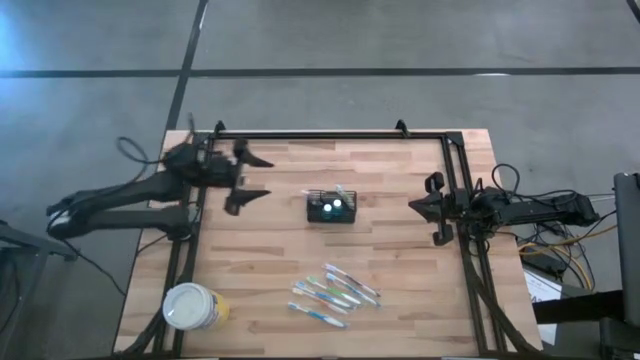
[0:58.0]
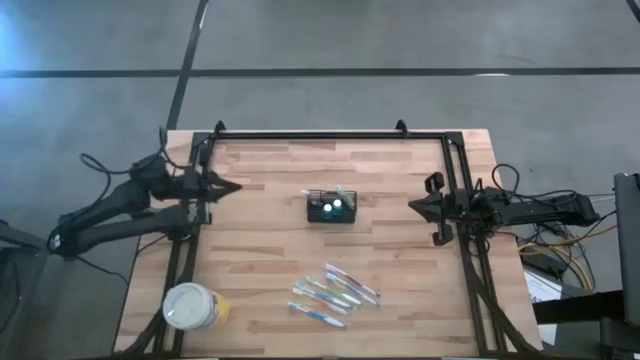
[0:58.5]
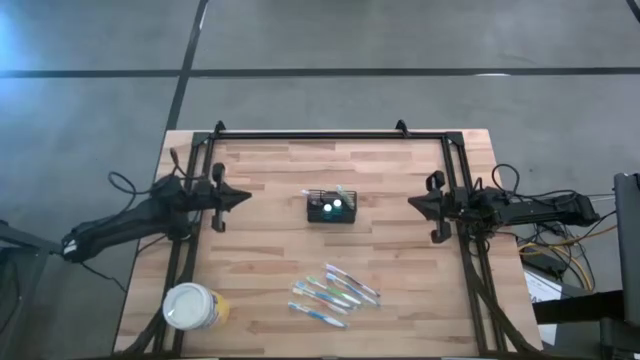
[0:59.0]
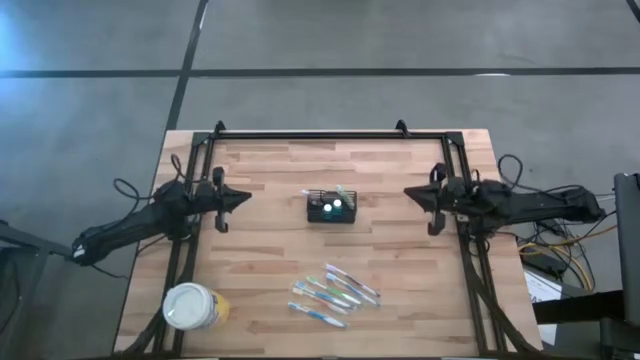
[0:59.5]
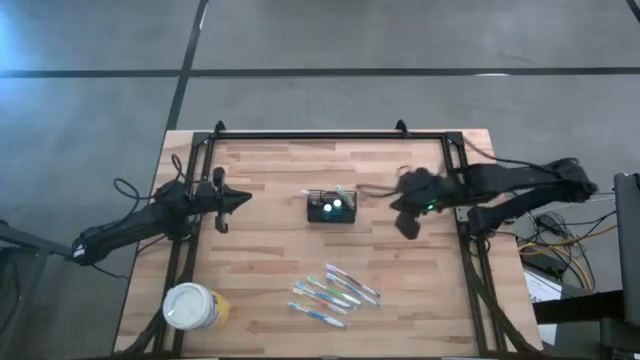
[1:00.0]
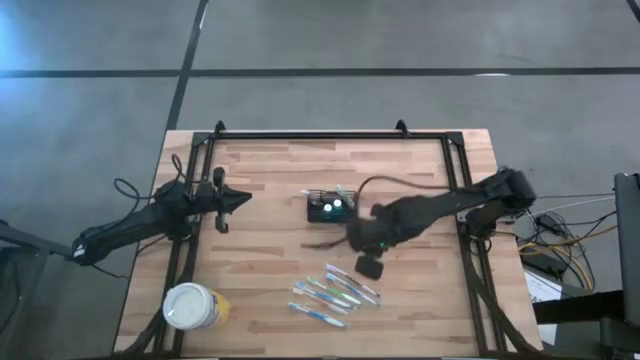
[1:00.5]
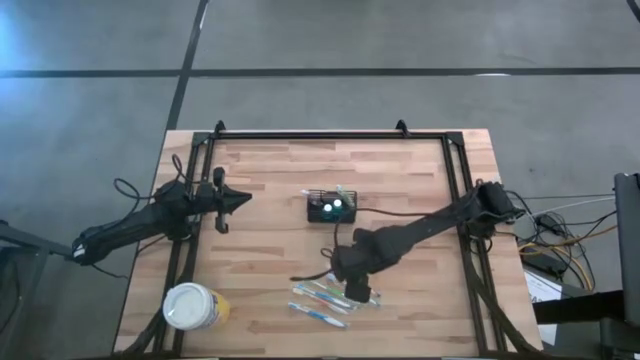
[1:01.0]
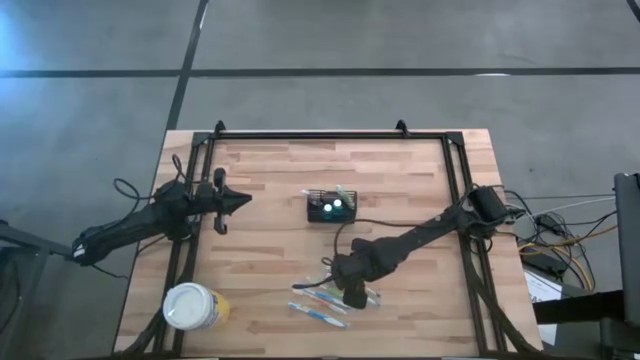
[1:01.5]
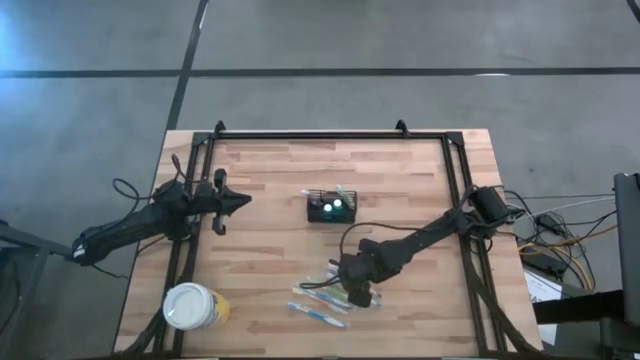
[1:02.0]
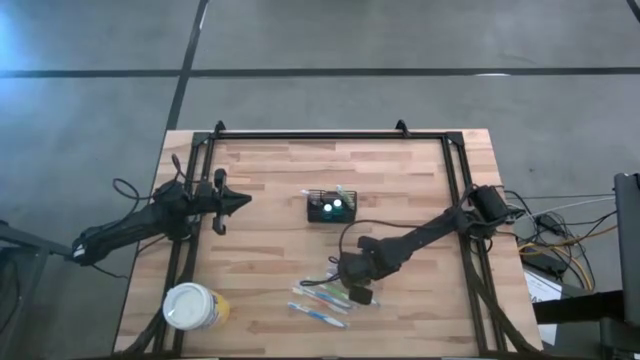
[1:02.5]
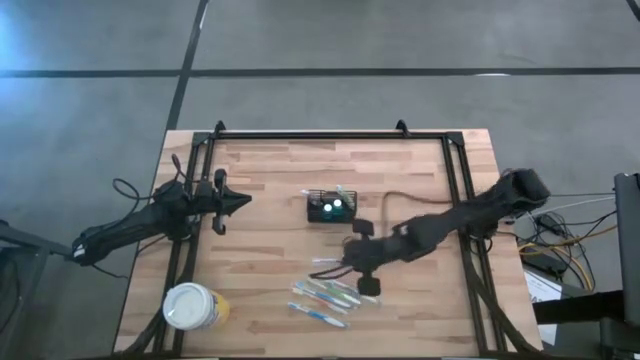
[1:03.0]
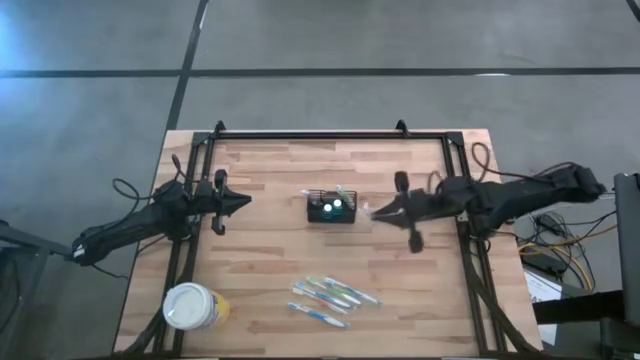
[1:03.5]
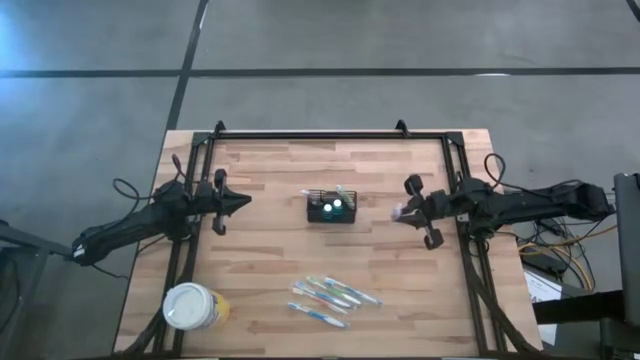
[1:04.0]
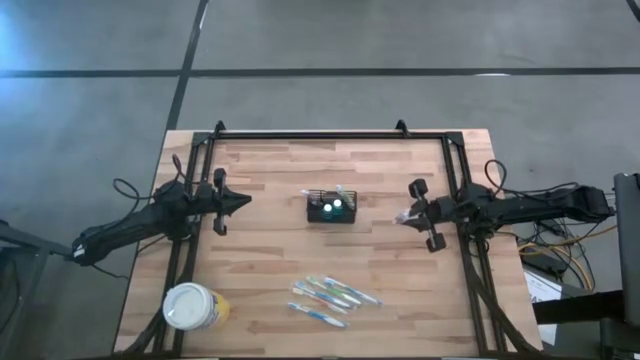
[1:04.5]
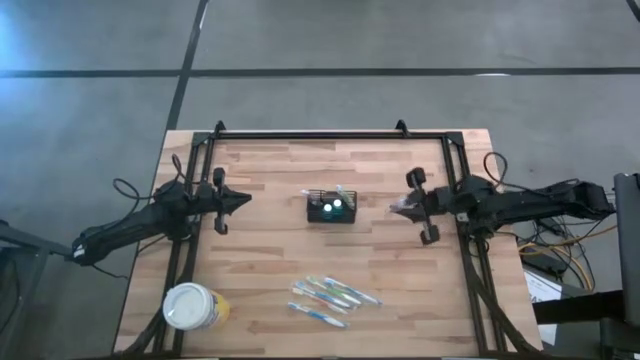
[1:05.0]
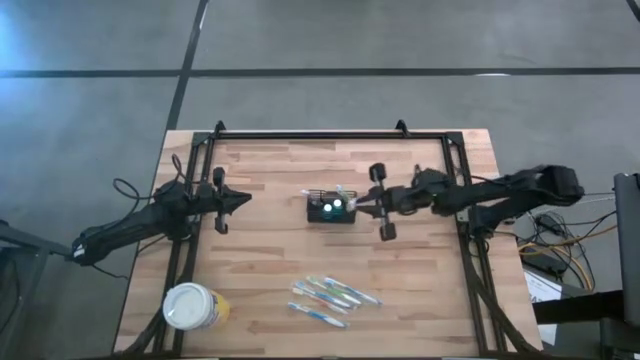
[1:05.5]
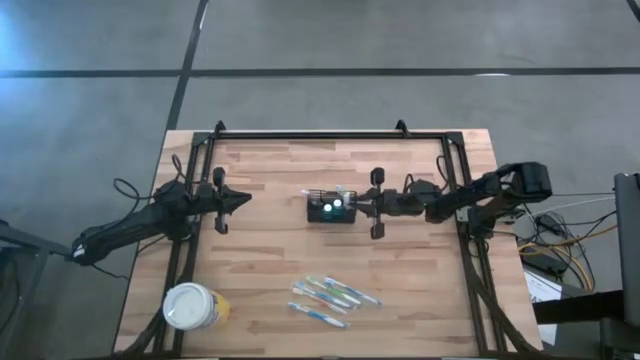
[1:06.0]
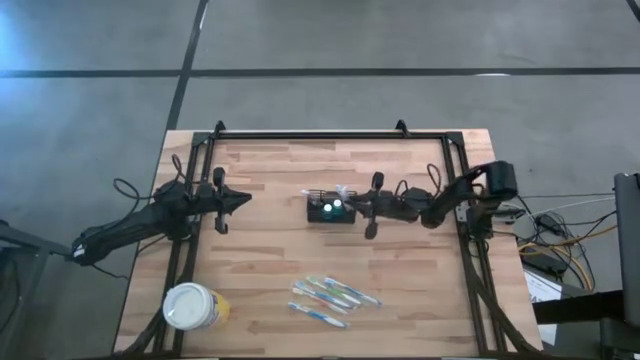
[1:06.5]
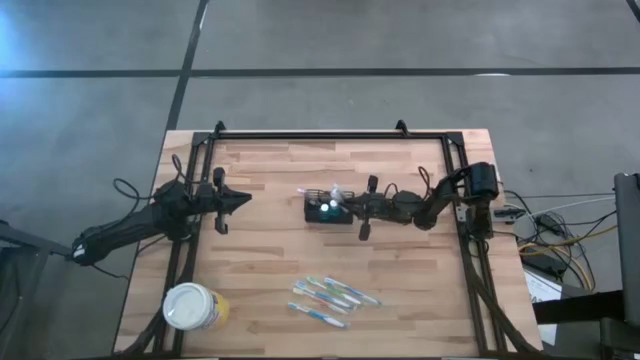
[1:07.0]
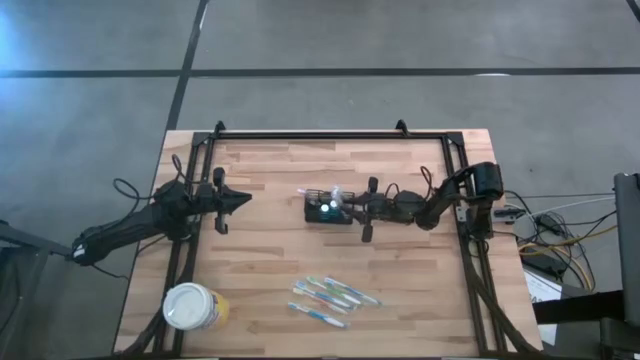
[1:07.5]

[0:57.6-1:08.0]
Task: Pick & Place toothbrushing station
Put the purple toothbrush into the black organizer

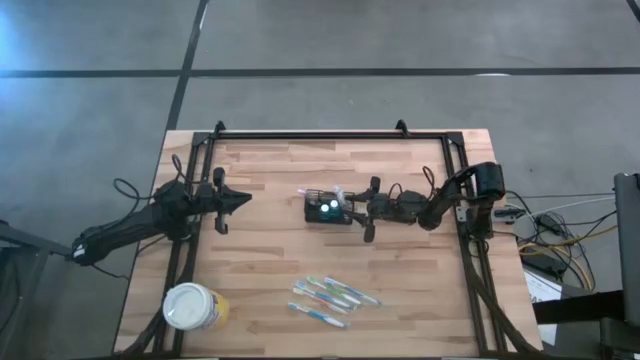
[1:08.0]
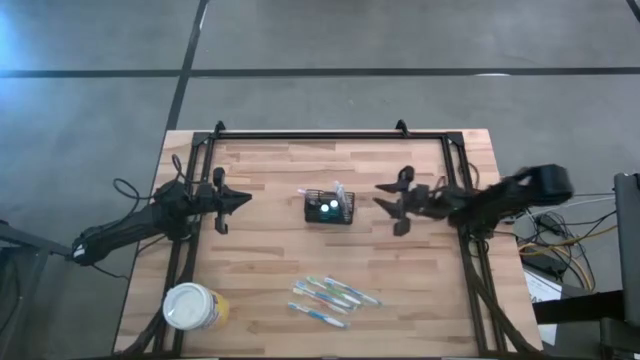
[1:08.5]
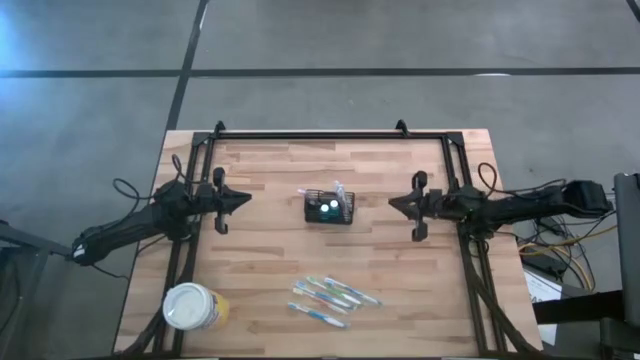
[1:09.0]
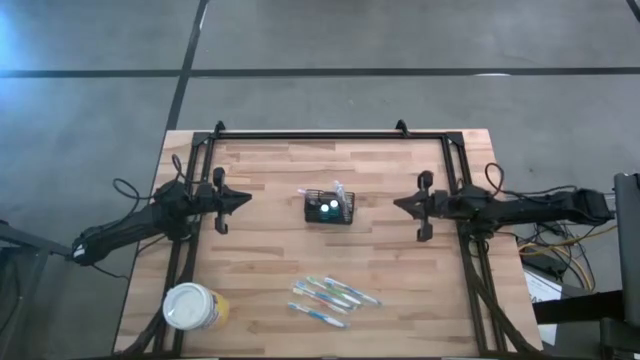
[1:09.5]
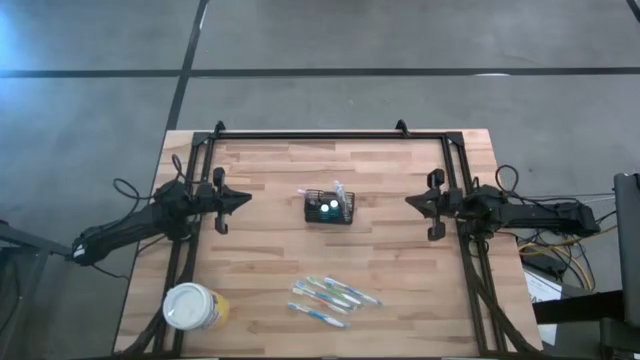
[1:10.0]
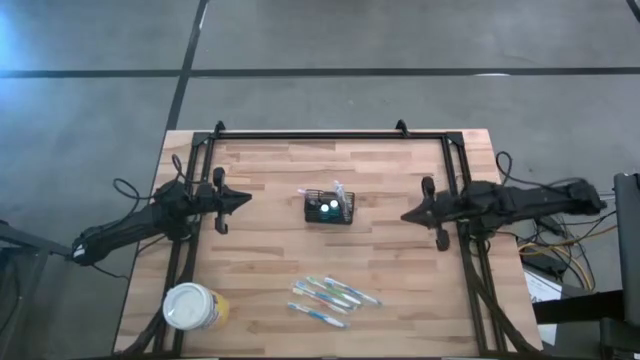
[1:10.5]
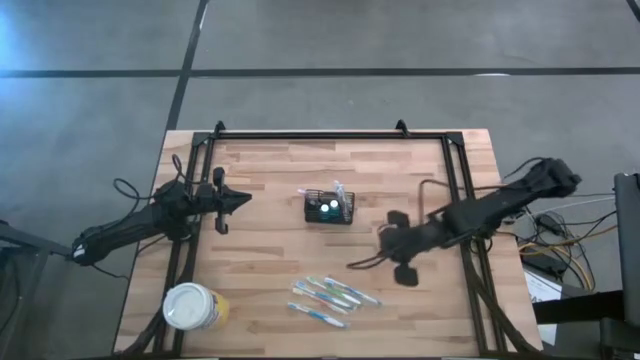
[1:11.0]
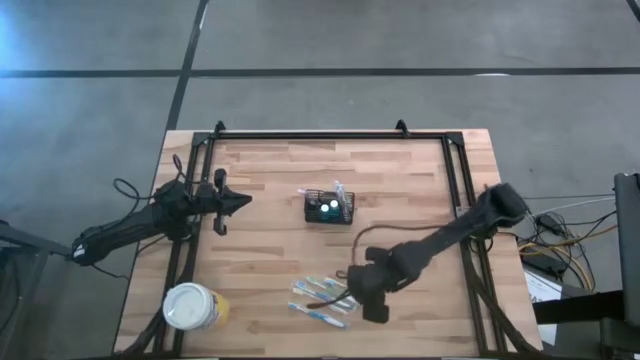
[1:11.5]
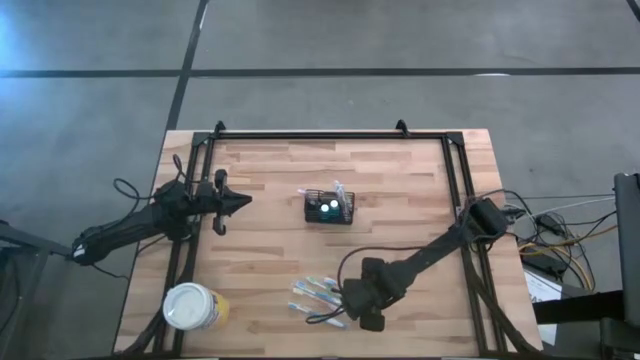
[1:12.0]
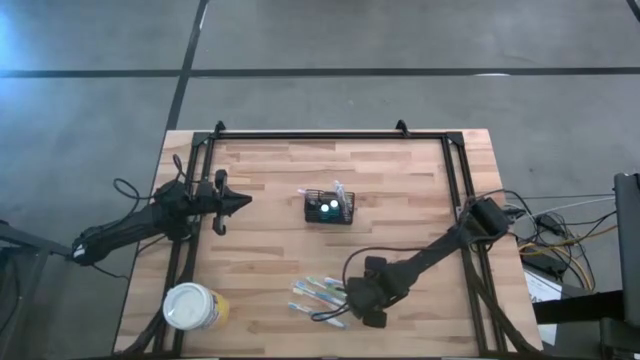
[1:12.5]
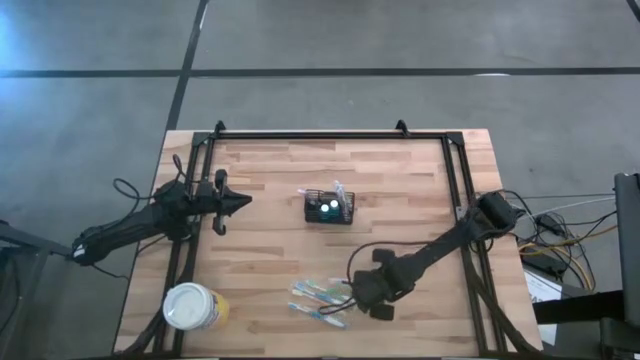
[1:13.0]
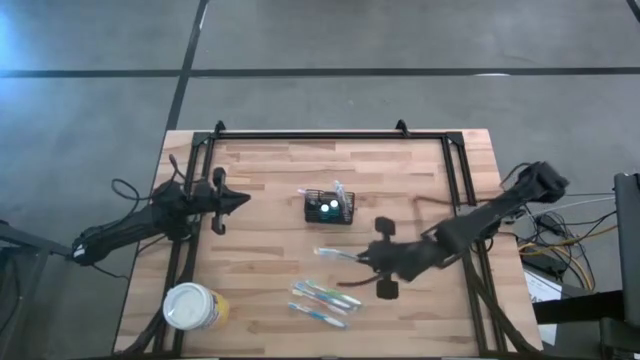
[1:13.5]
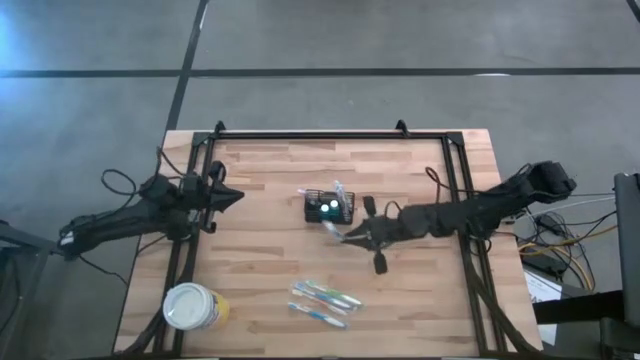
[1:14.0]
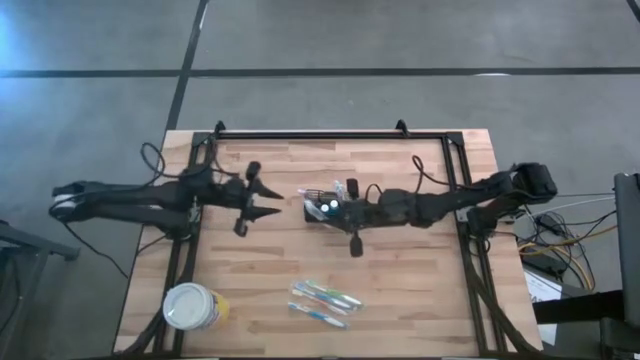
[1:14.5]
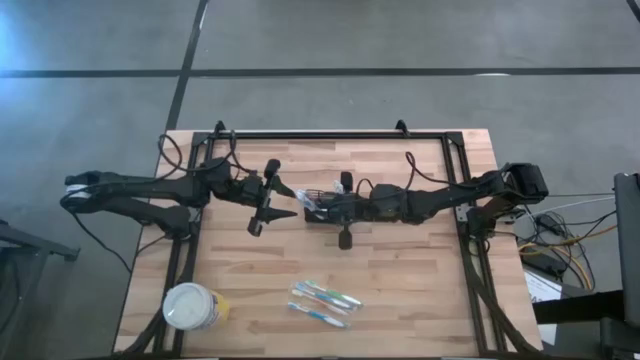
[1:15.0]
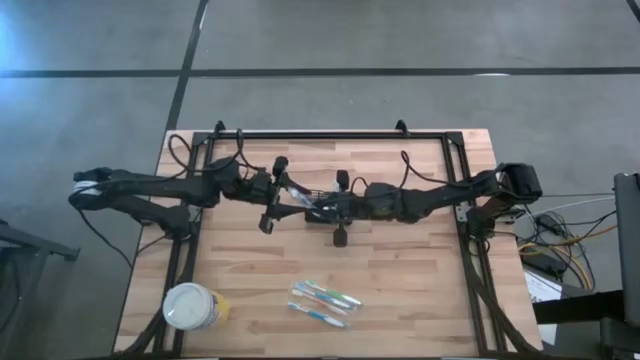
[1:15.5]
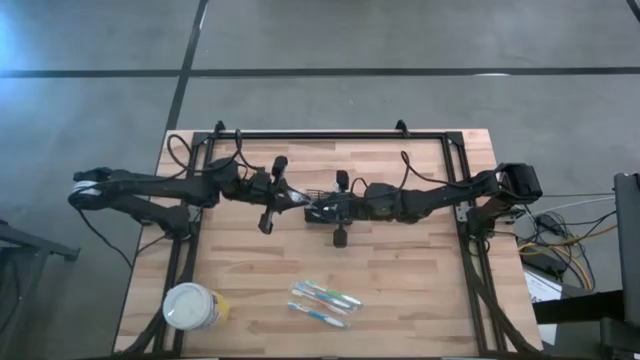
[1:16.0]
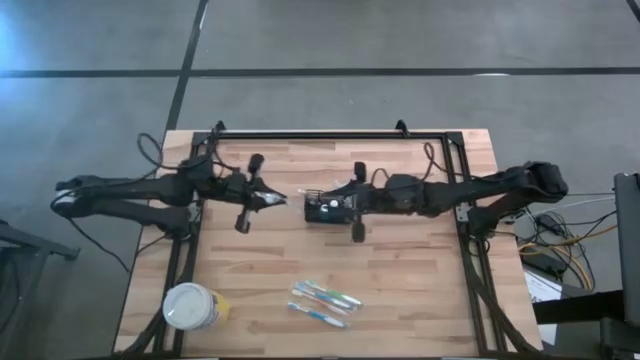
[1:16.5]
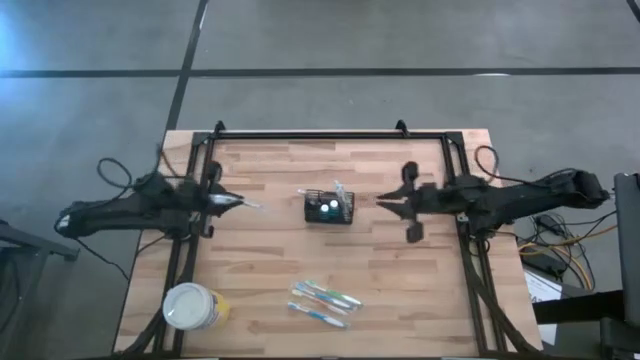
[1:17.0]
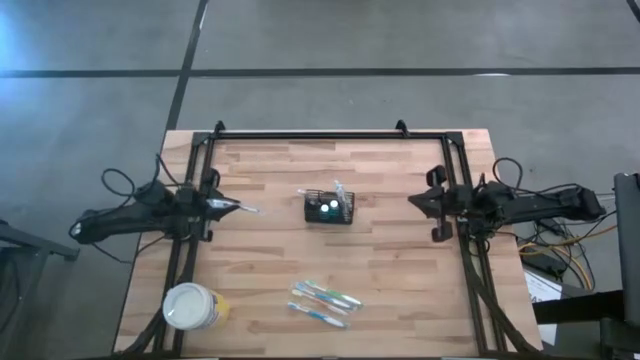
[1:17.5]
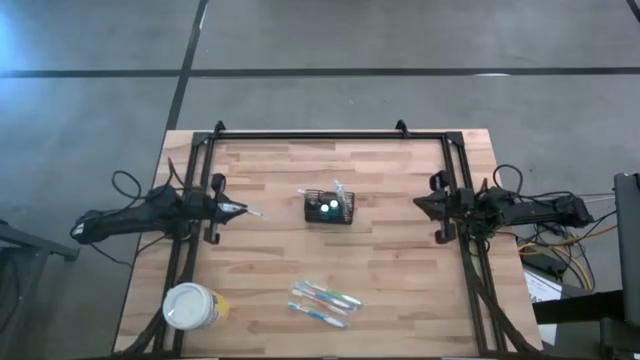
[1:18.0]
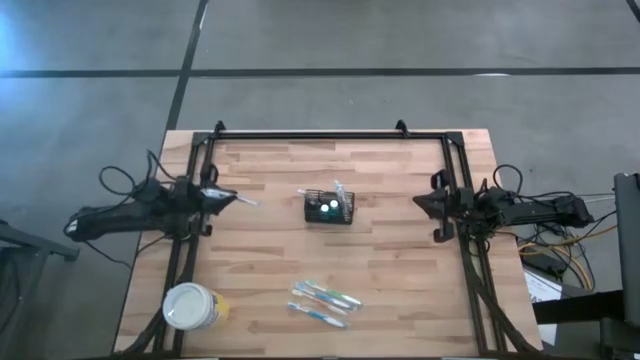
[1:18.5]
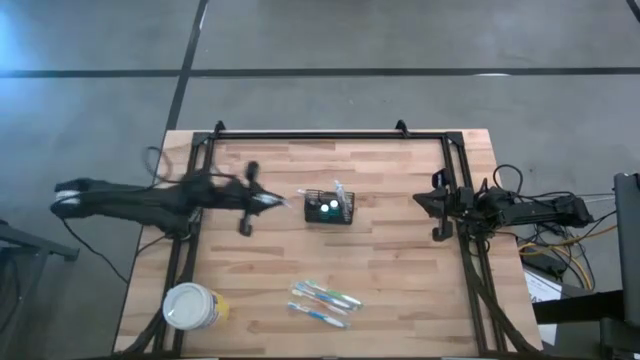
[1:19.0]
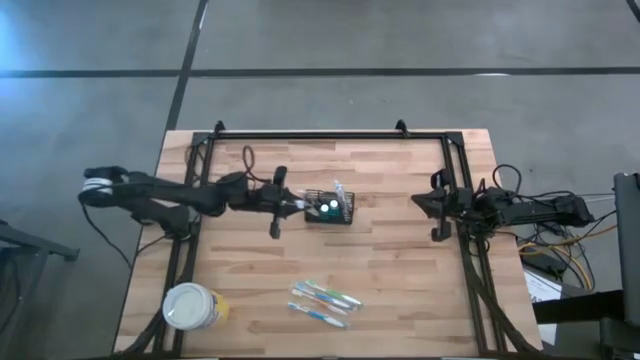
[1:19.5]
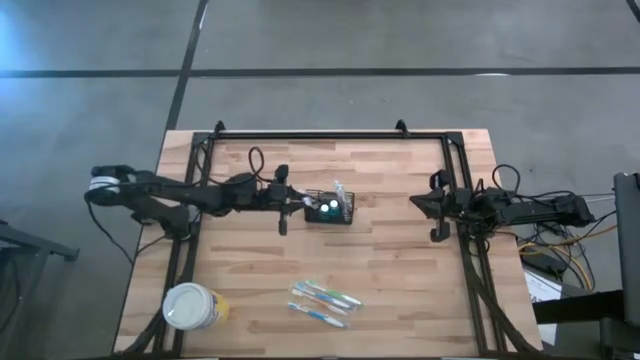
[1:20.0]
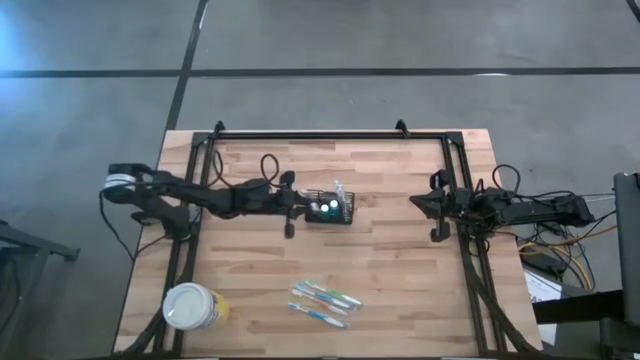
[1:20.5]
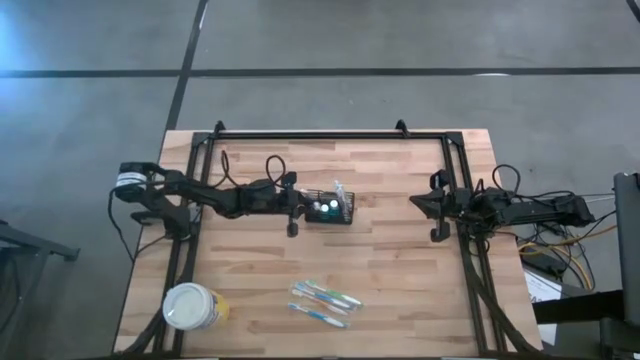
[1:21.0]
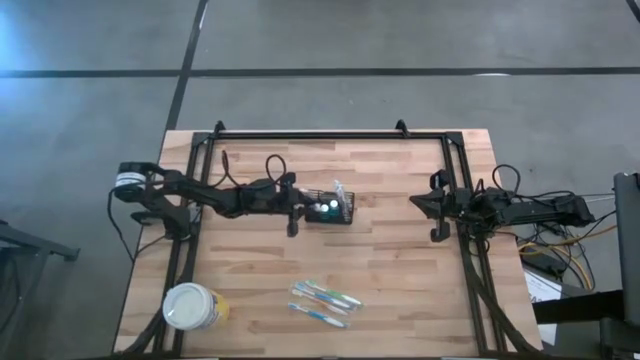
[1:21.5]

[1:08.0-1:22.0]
Put the top blue toothbrush into the black organizer
